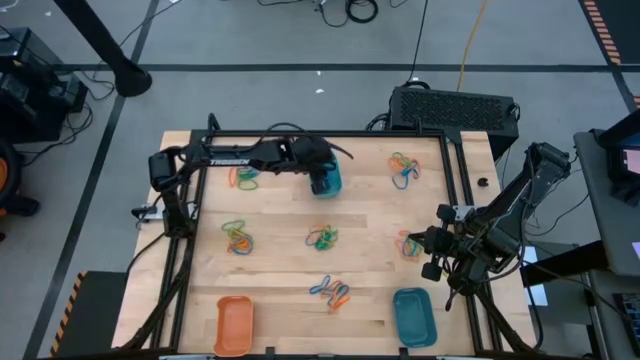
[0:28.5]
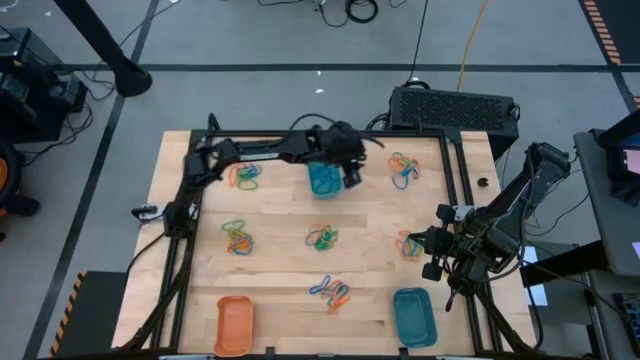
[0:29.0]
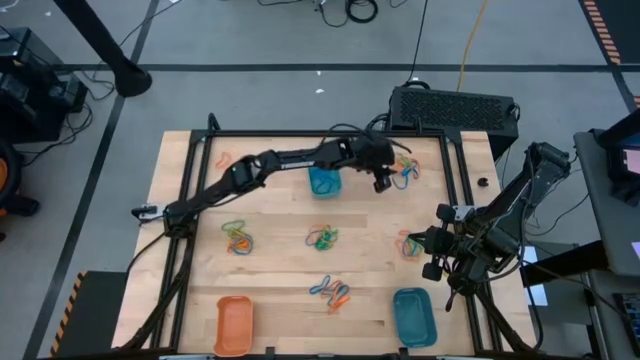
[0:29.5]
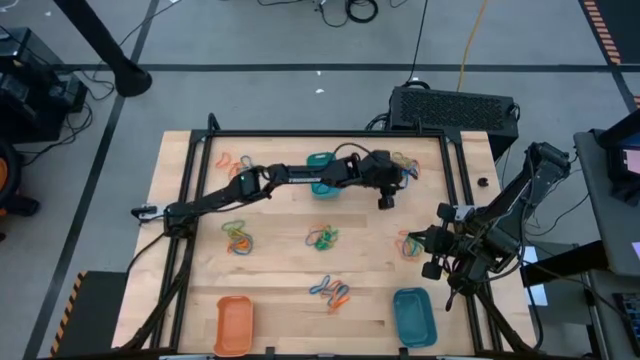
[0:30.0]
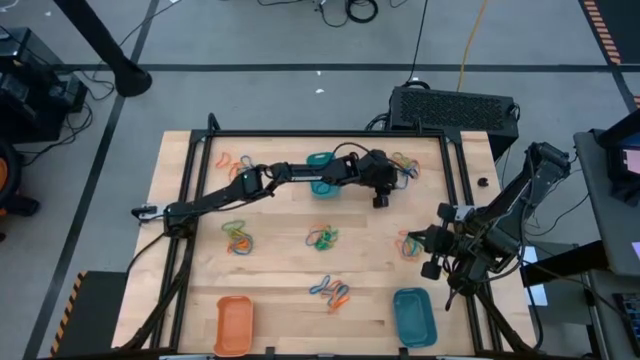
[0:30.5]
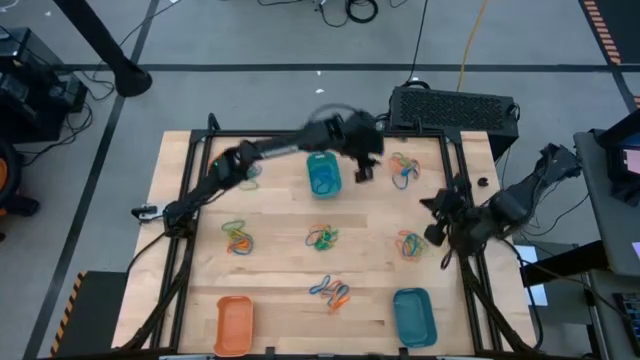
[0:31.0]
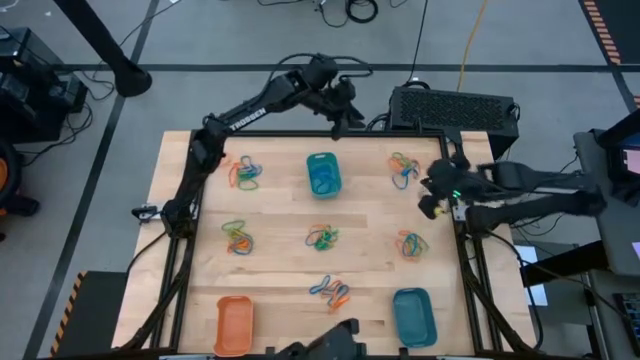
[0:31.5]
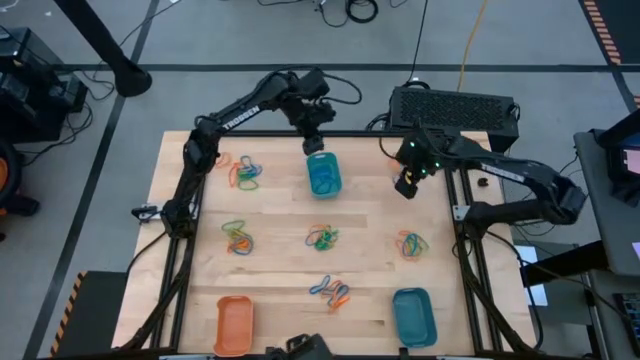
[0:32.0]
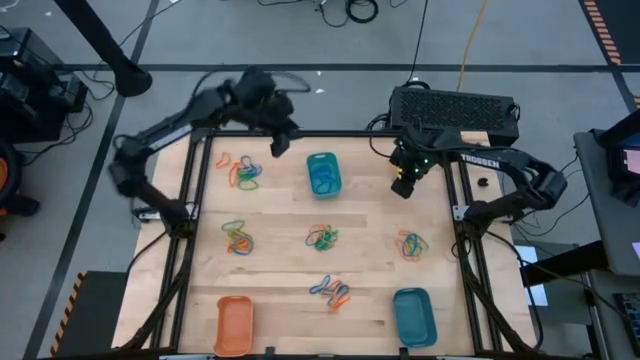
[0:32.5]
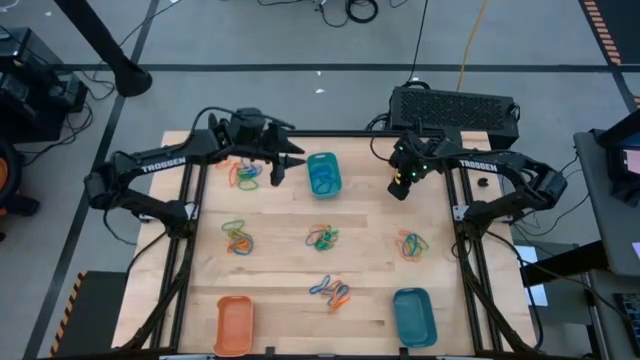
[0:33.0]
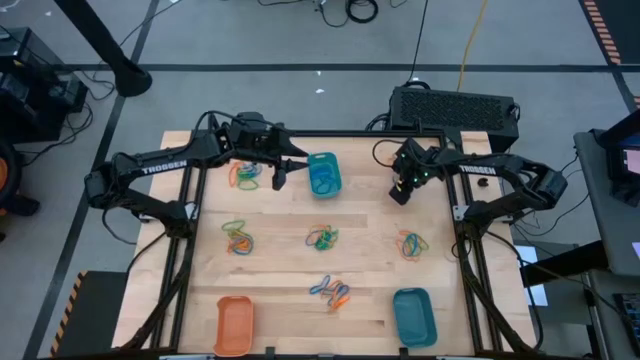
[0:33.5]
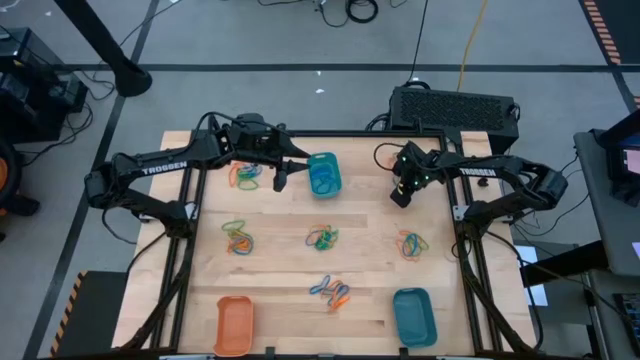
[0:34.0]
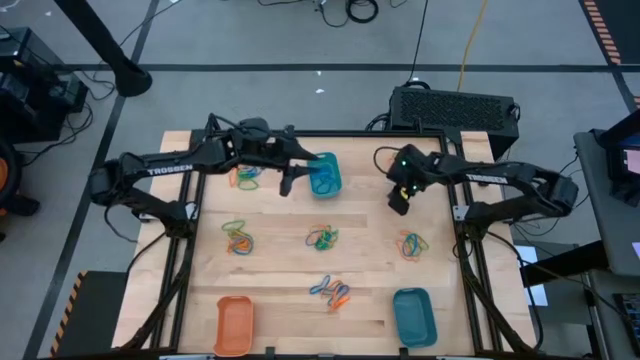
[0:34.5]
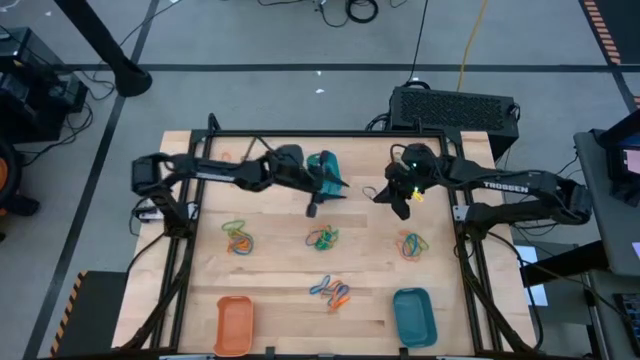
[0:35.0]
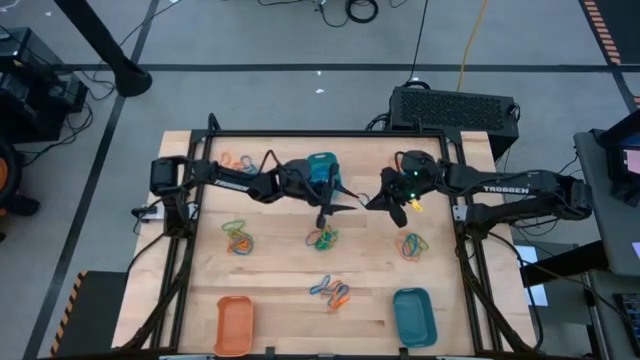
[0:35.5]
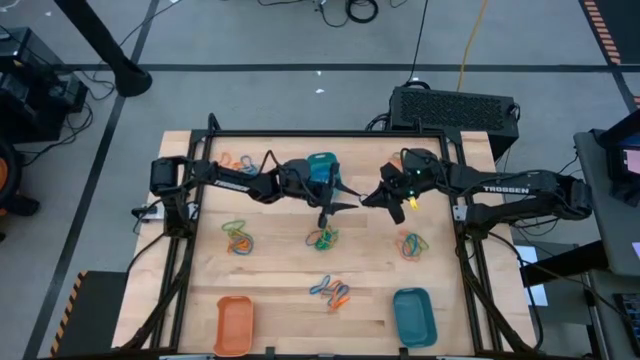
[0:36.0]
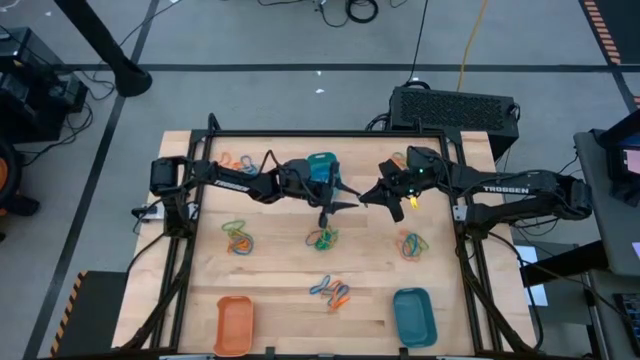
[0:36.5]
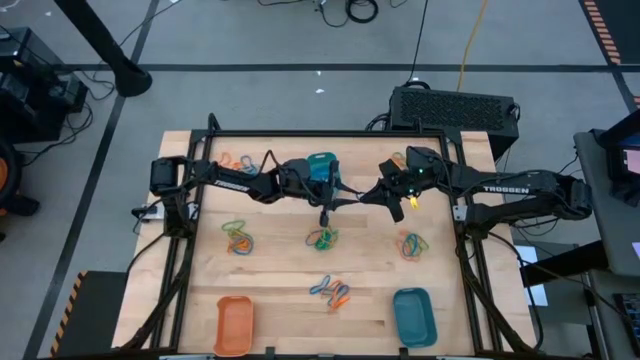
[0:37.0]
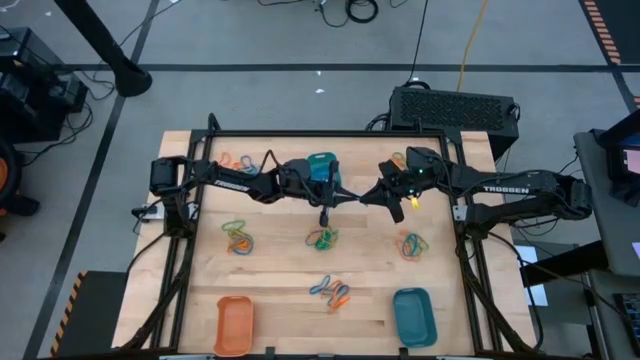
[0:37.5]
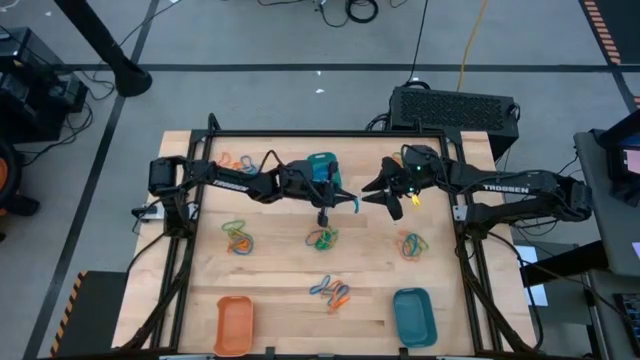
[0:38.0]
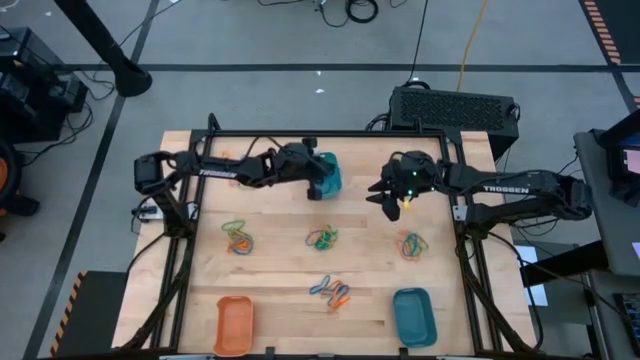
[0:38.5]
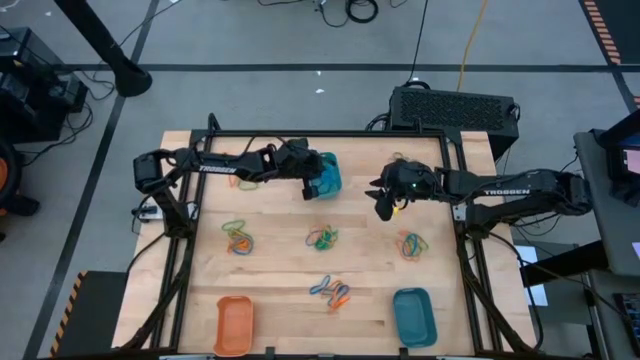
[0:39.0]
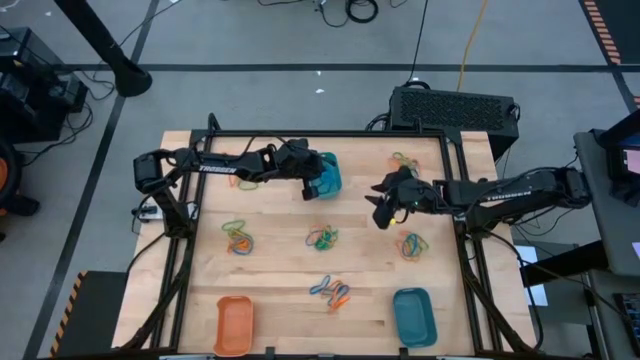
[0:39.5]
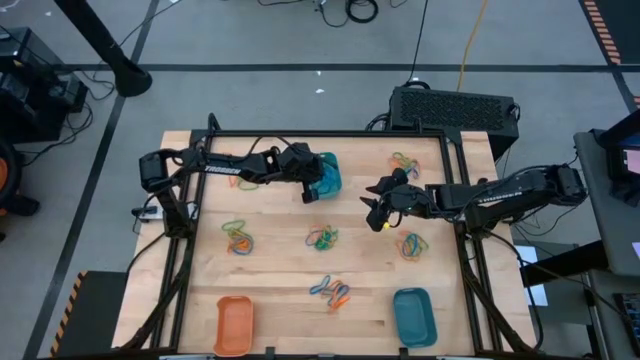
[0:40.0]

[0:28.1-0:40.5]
Task: Sort rubber bands into baskets
Put the blue rubber band into the top blue bin

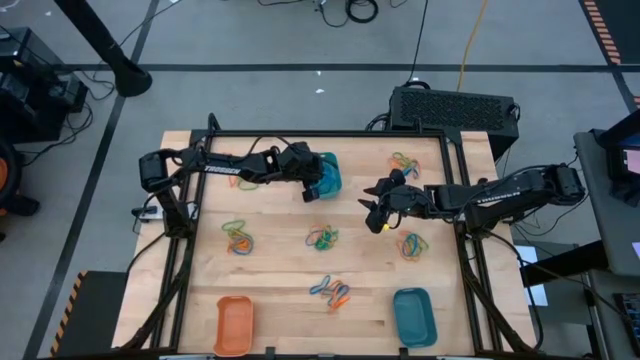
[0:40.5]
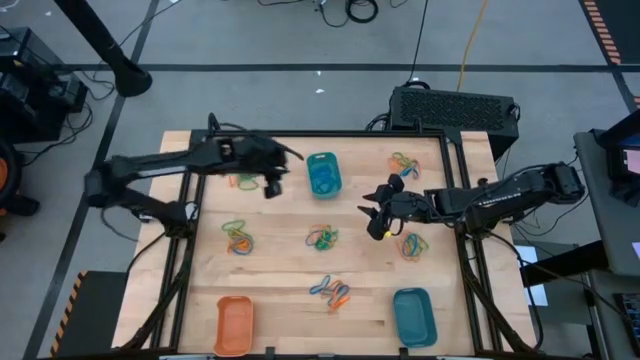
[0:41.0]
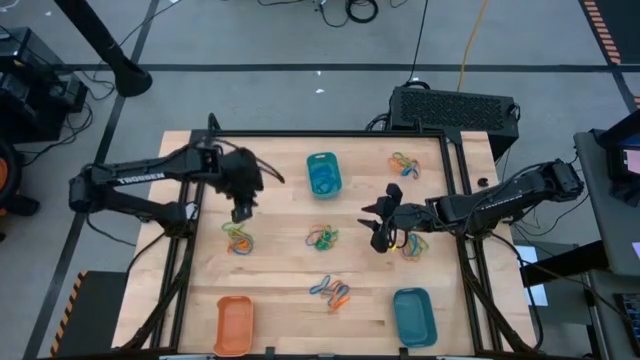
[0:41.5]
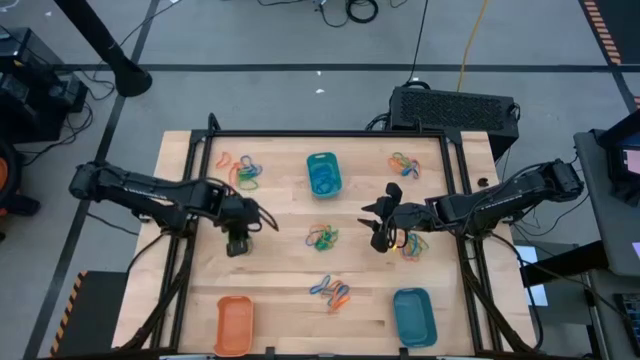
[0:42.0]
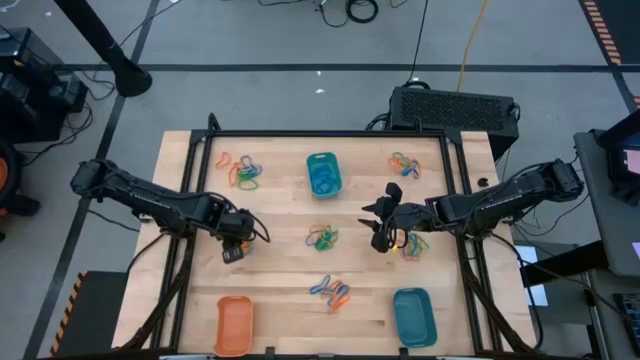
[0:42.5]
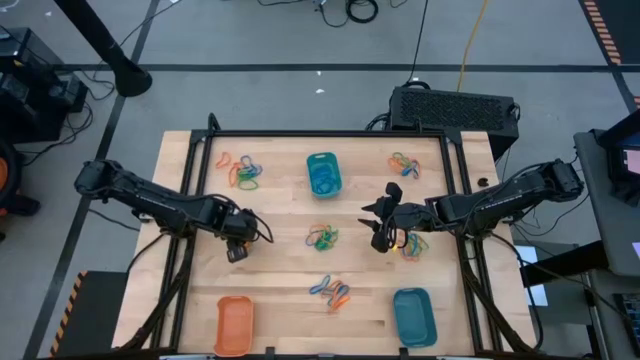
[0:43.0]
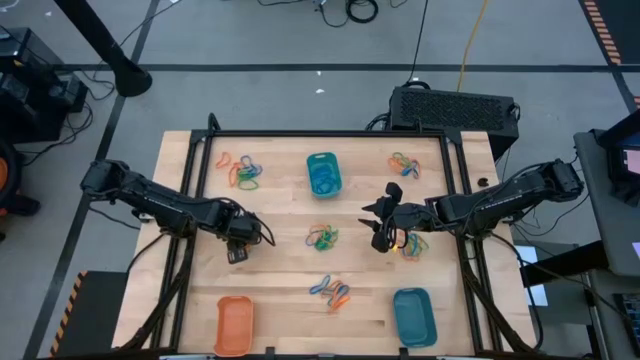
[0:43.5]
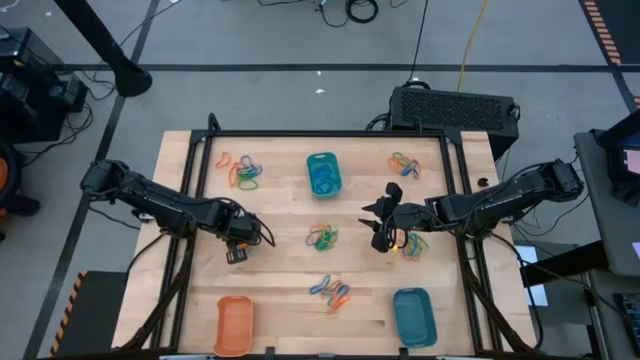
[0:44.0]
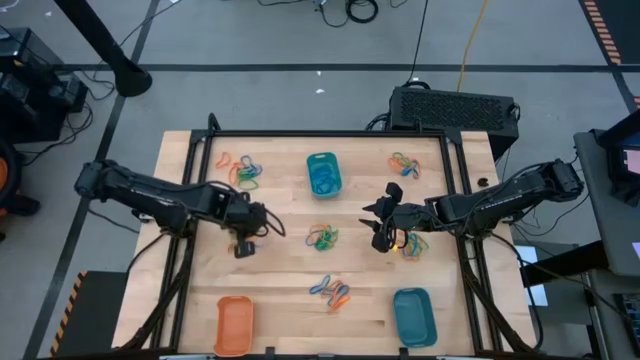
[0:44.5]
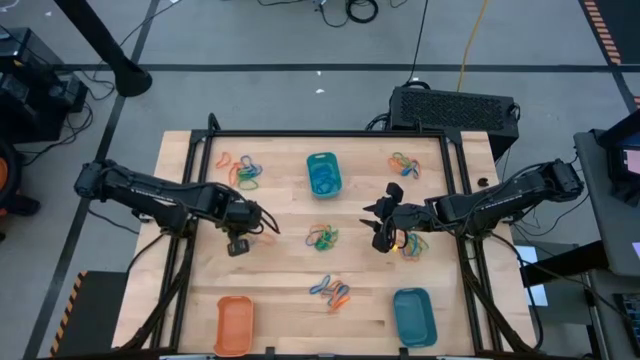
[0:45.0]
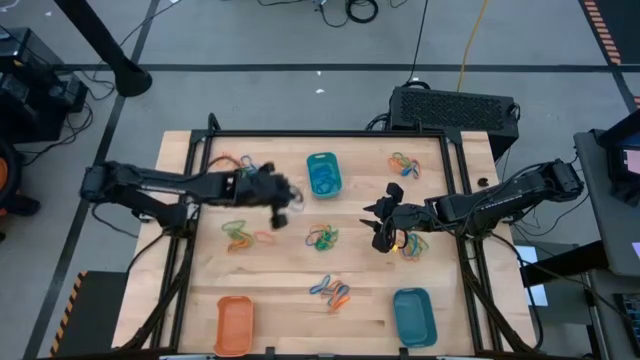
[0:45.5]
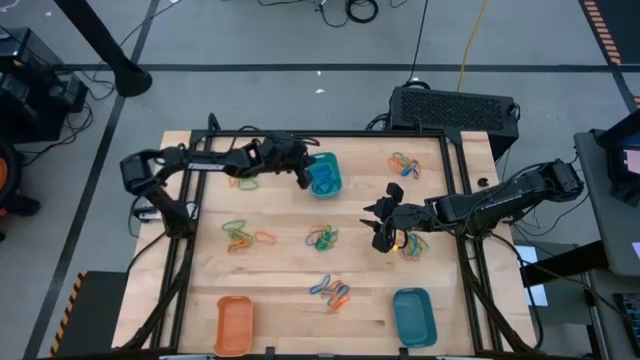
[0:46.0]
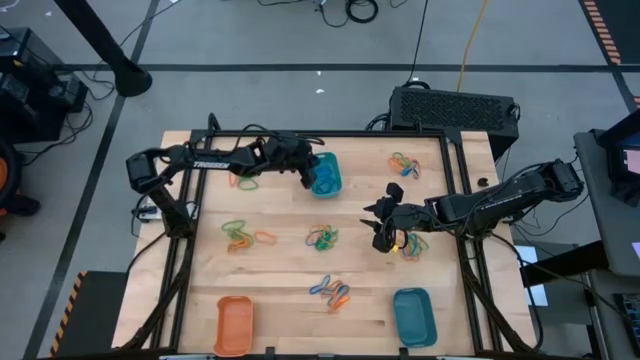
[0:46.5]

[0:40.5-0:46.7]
Put the blue rubber band into the top blue bin

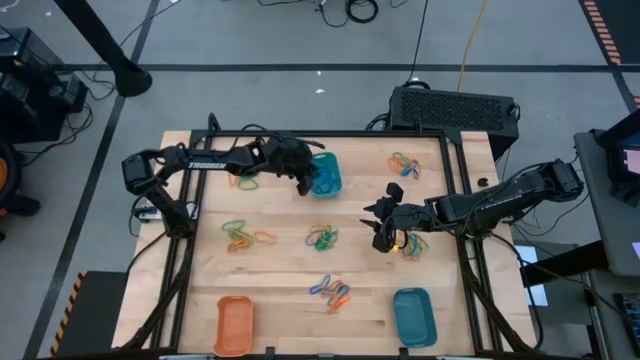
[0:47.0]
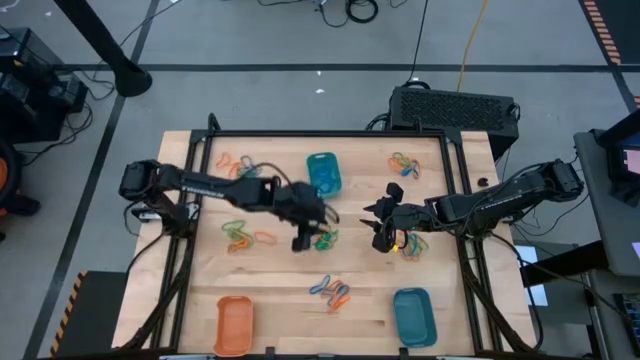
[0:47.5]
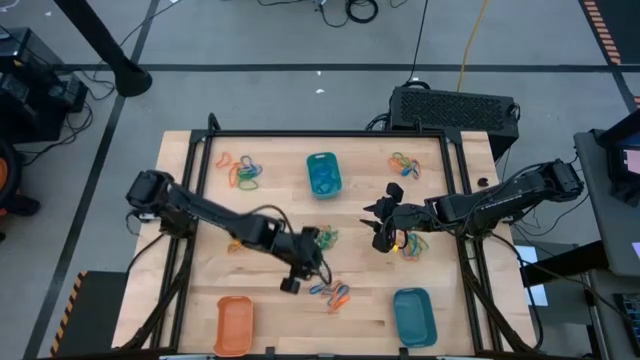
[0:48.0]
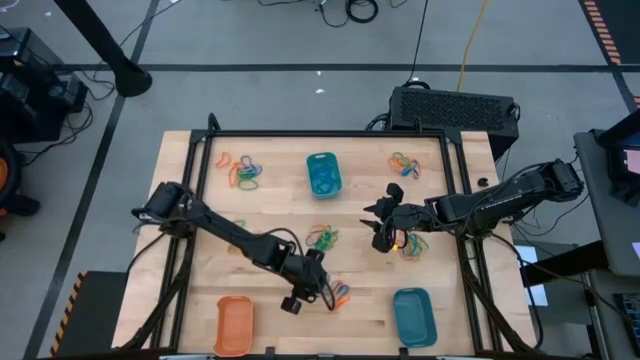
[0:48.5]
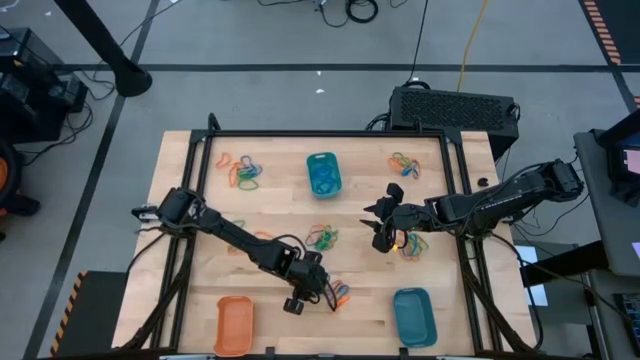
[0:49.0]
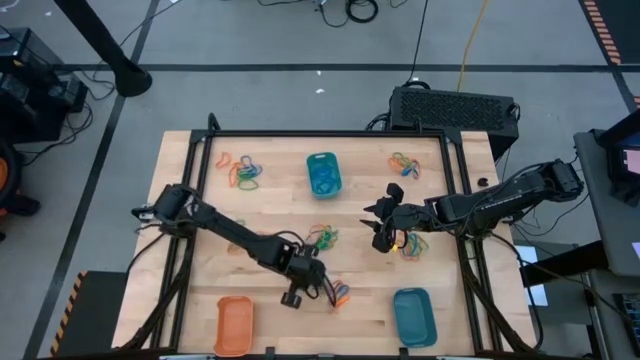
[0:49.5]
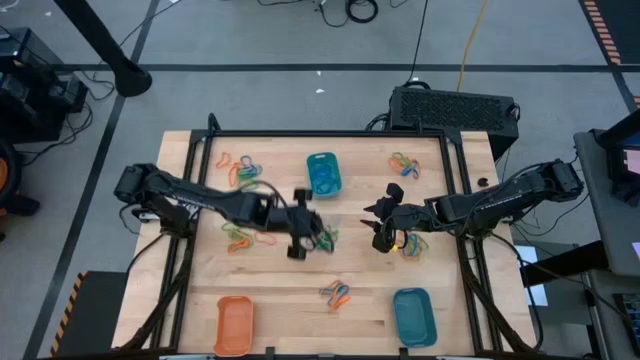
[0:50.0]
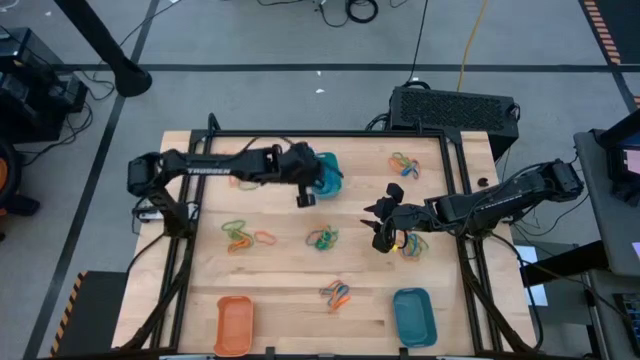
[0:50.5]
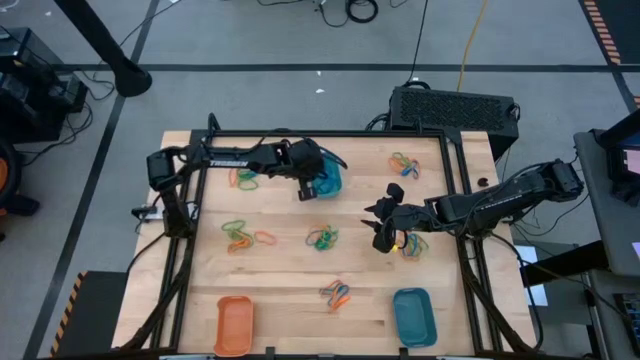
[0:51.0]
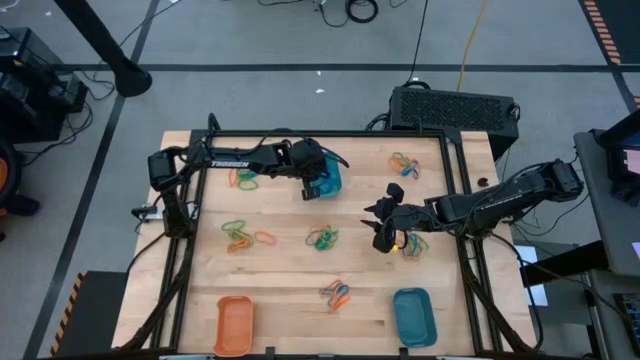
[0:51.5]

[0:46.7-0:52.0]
Put the blue rubber band into the top blue bin
